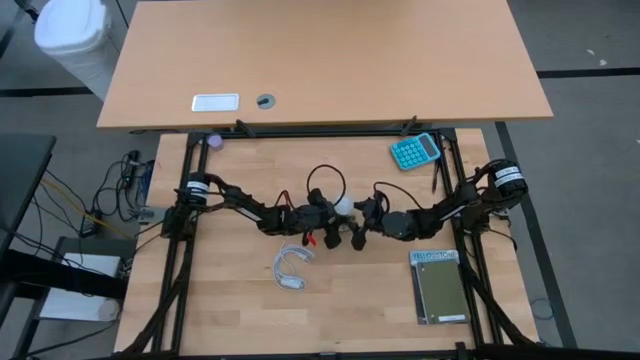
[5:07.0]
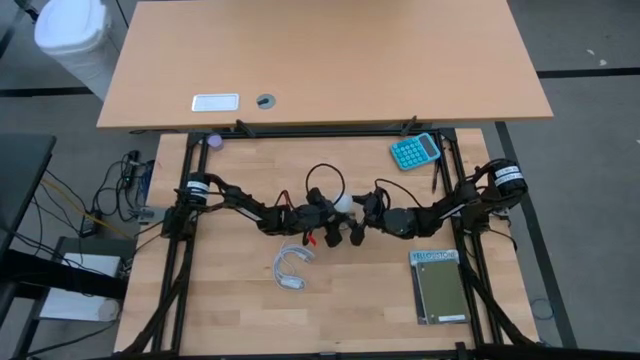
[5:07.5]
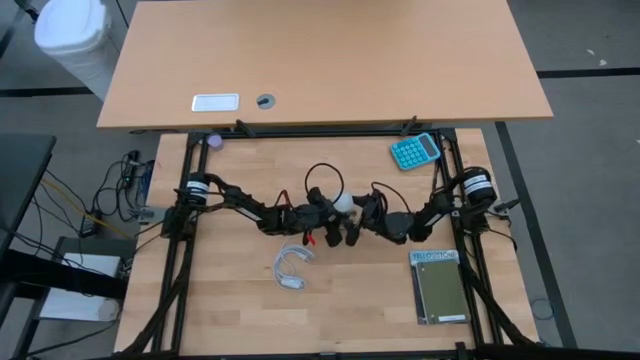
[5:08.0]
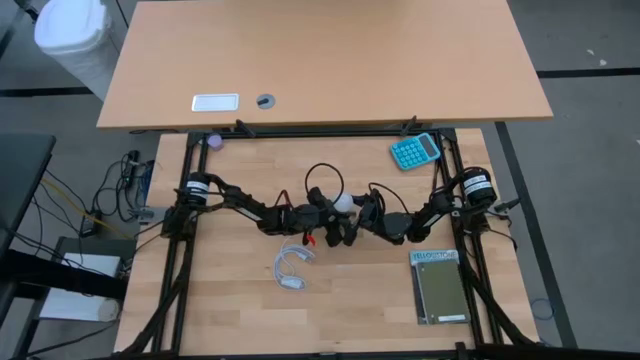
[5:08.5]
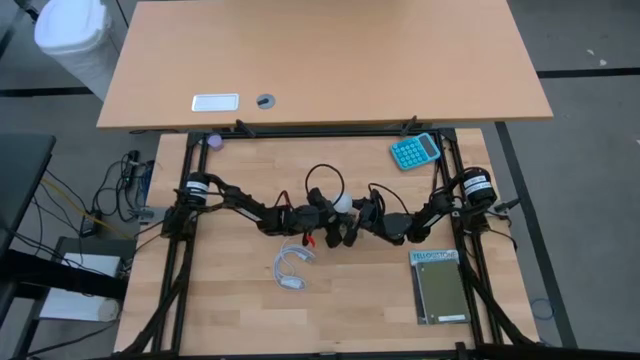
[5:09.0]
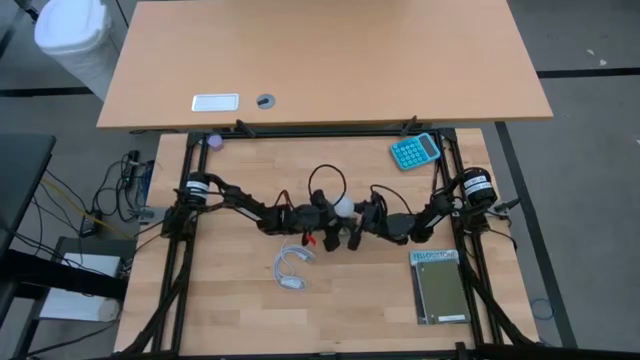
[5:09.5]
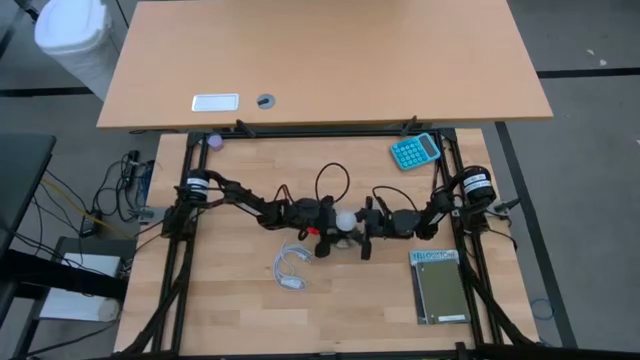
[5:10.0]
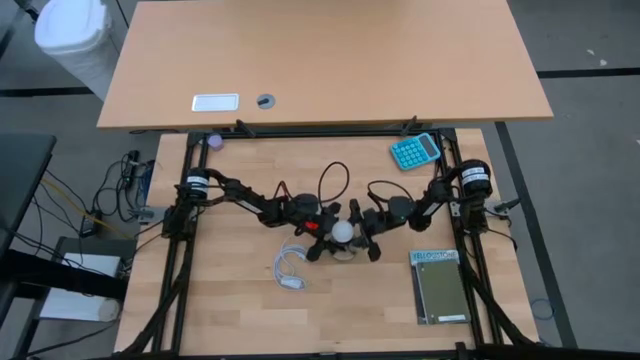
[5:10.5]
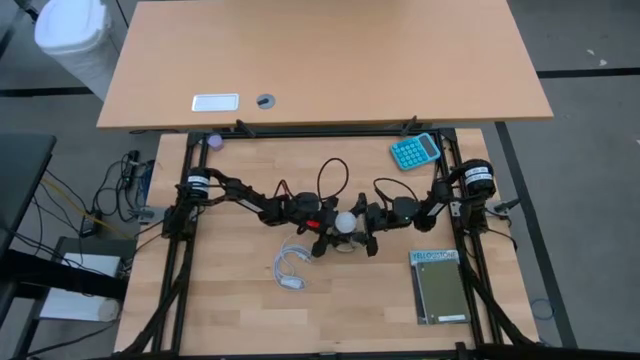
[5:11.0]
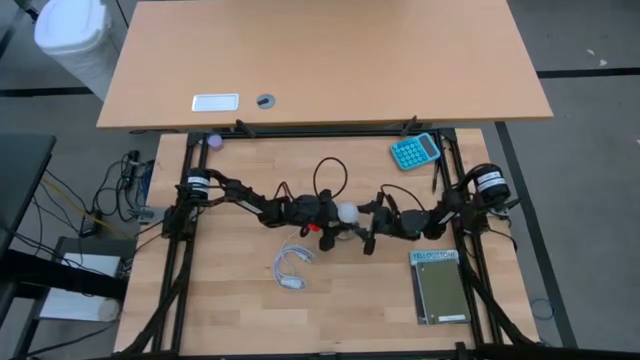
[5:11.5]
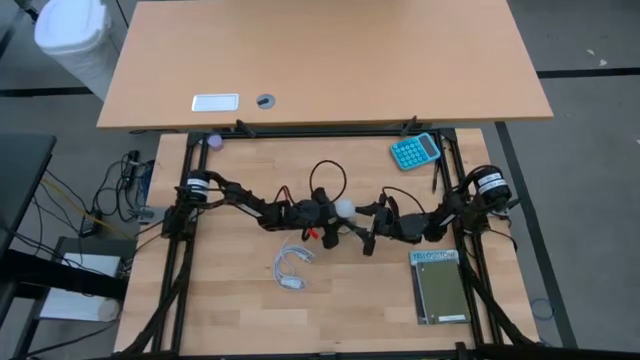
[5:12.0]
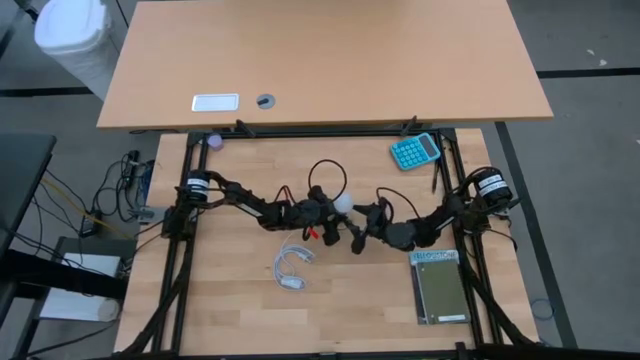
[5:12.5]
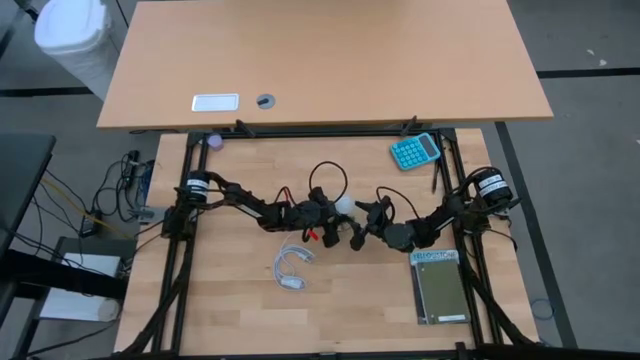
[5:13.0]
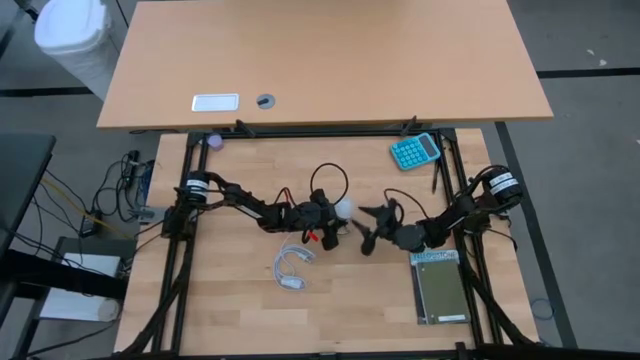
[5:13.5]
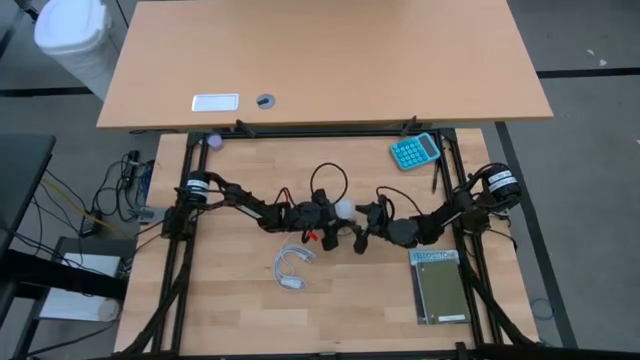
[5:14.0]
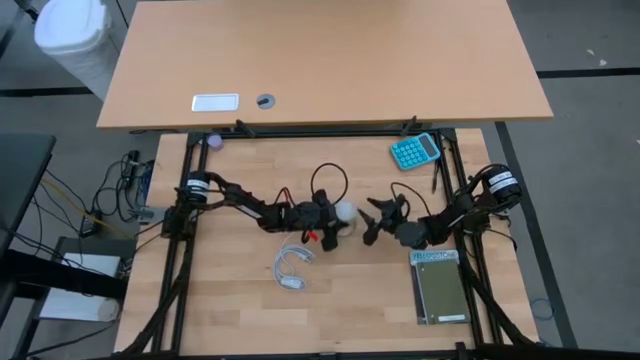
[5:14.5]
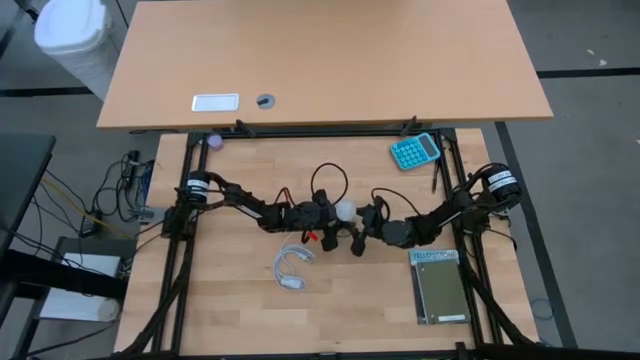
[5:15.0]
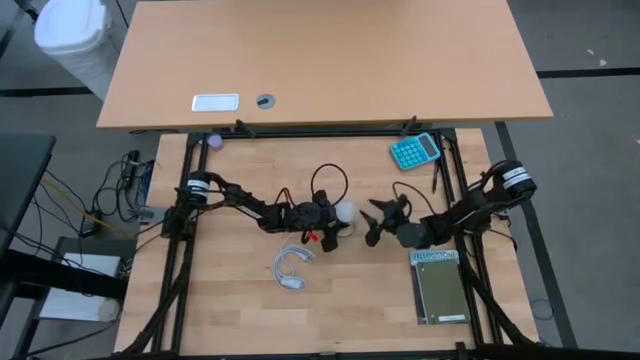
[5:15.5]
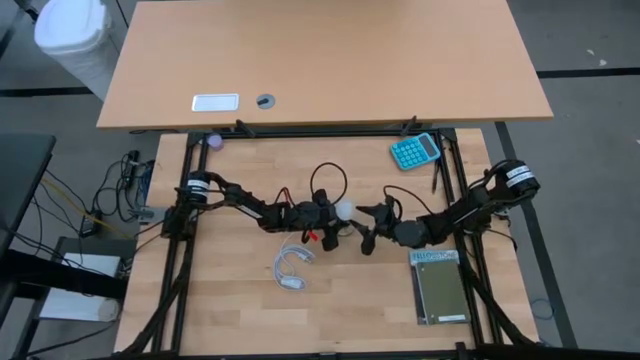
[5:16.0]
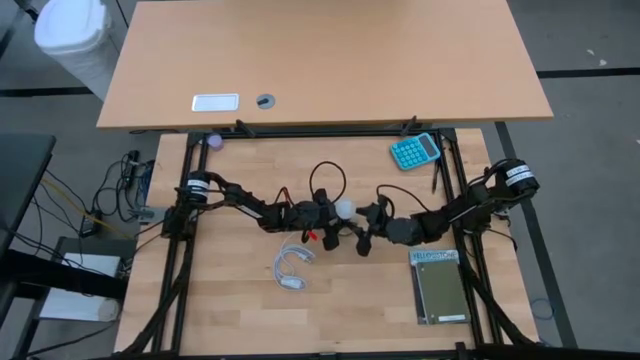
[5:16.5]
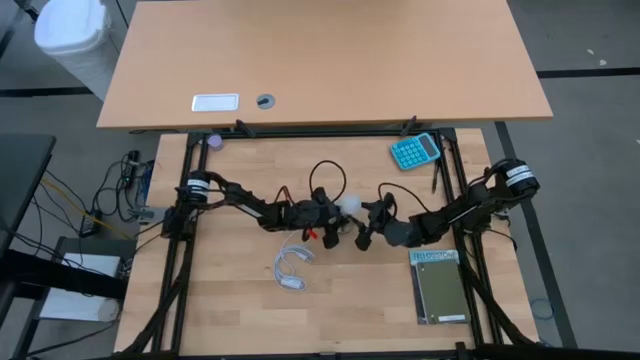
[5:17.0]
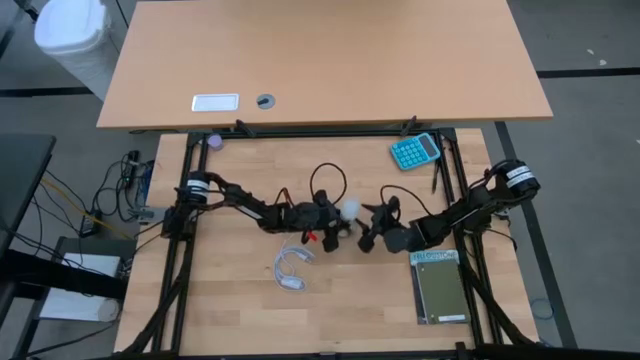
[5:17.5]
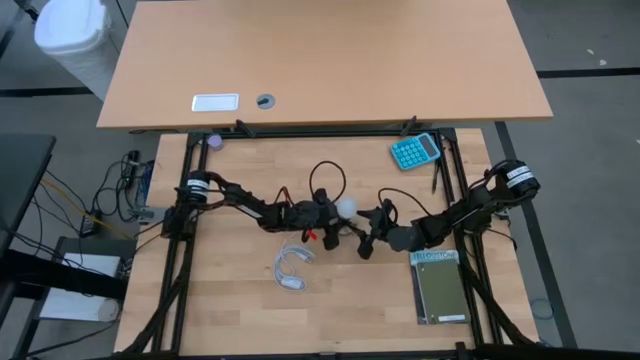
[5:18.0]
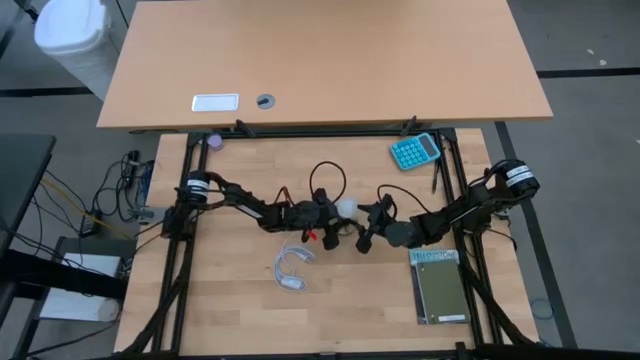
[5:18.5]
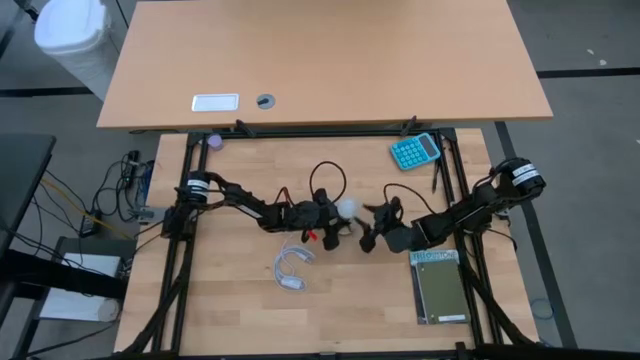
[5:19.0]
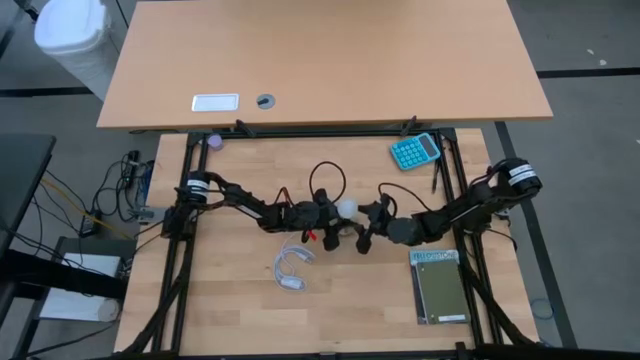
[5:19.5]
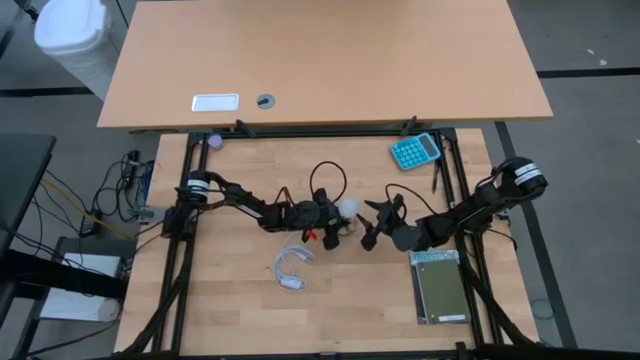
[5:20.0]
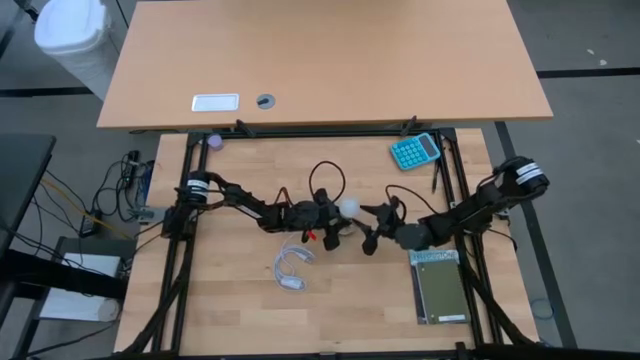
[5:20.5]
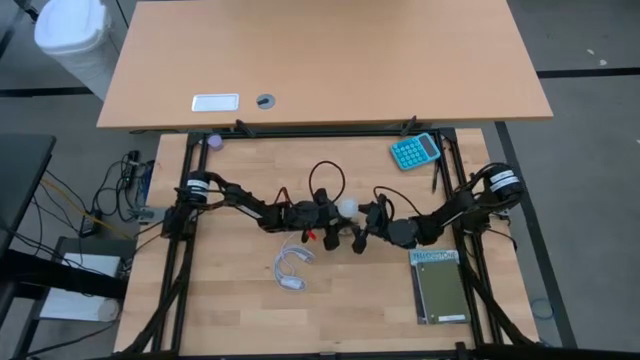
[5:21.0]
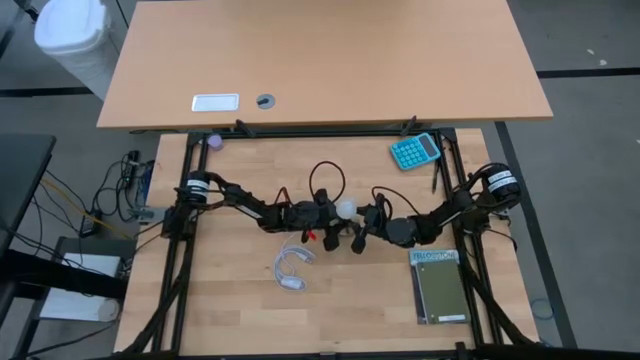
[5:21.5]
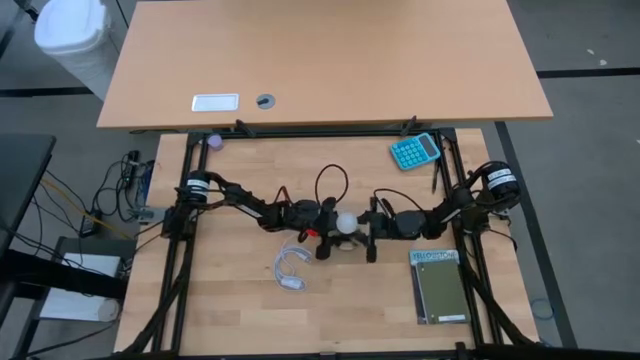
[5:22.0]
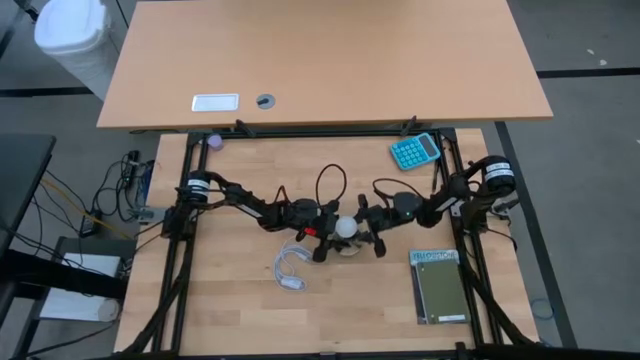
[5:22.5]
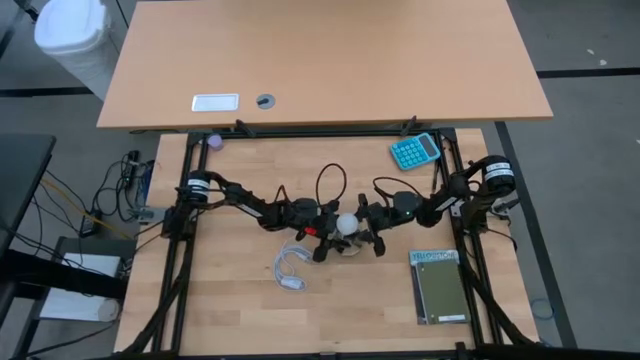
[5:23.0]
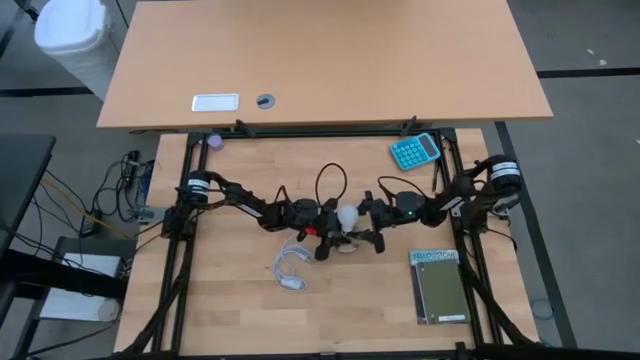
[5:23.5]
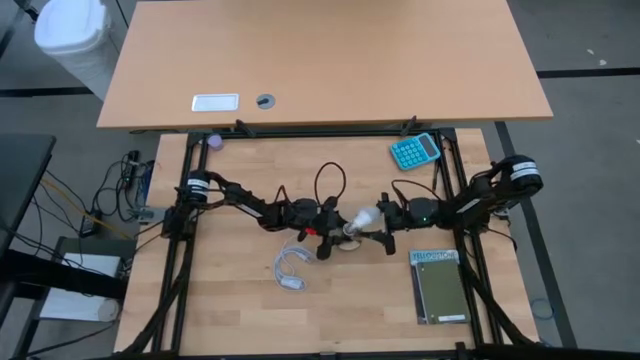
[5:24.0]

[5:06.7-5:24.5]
Task: Screw lightbulb
Remove the lightbulb from the socket
